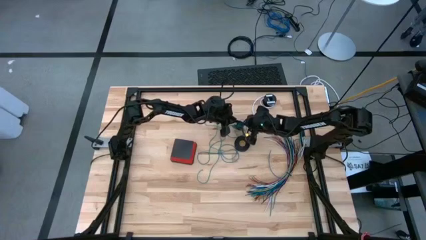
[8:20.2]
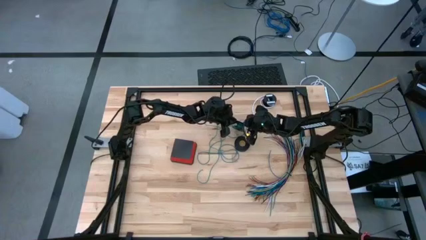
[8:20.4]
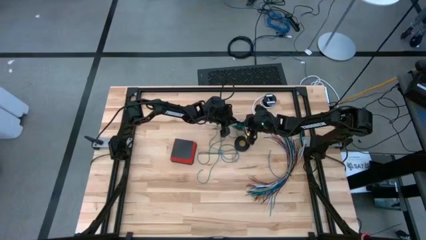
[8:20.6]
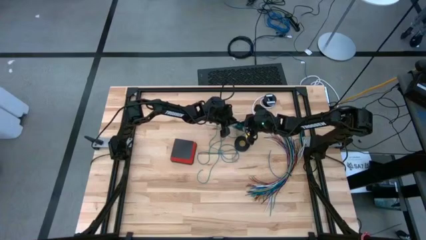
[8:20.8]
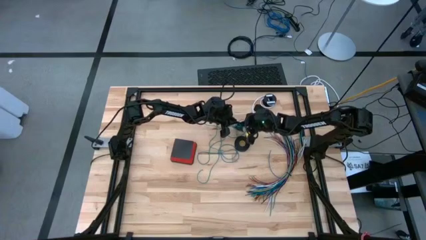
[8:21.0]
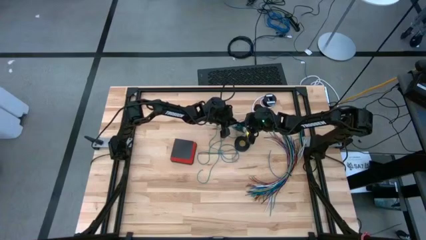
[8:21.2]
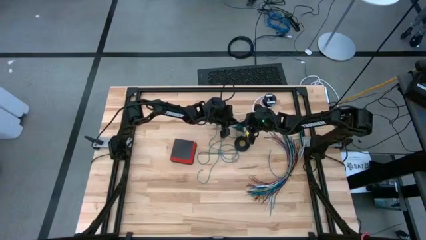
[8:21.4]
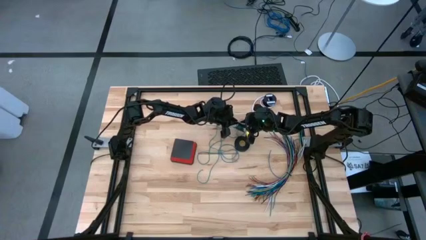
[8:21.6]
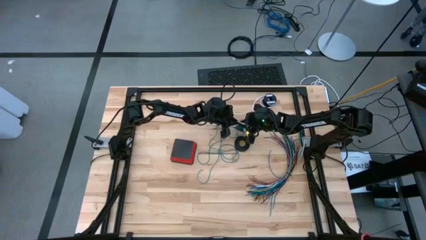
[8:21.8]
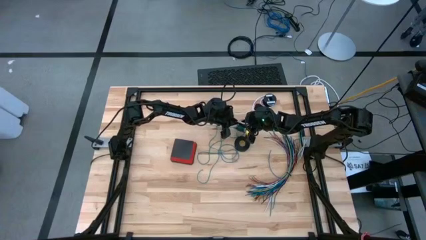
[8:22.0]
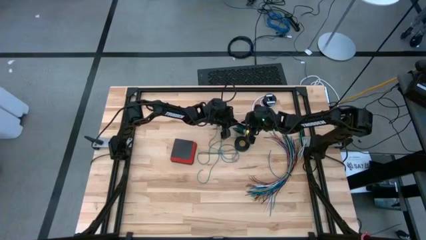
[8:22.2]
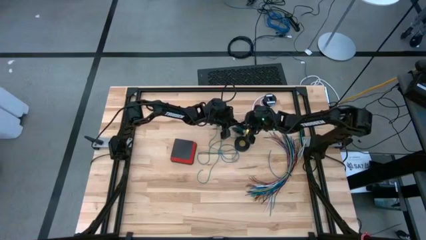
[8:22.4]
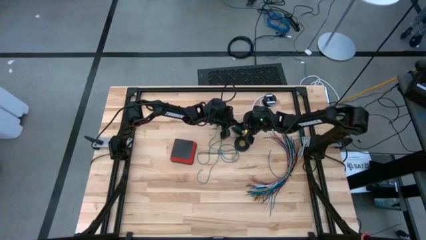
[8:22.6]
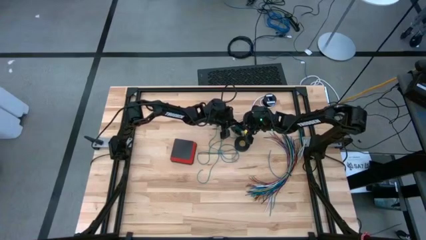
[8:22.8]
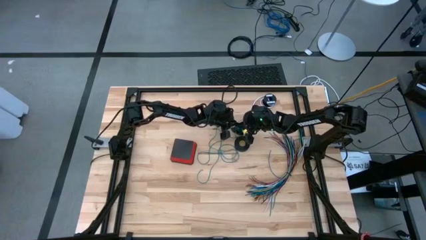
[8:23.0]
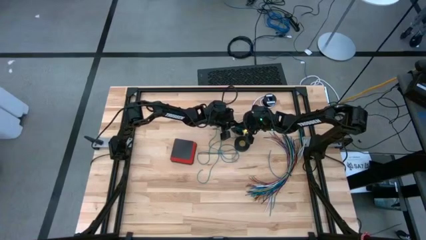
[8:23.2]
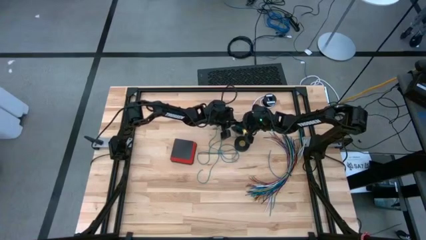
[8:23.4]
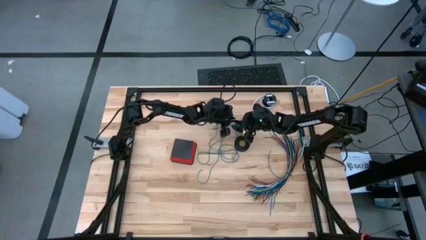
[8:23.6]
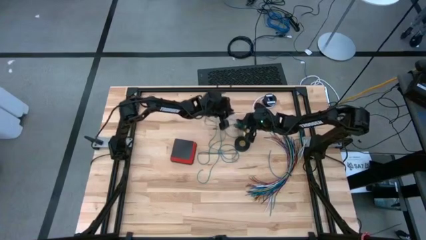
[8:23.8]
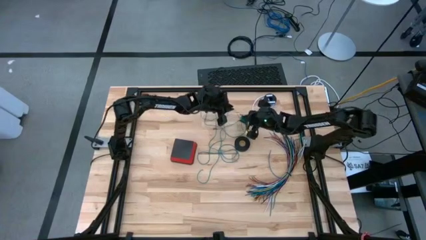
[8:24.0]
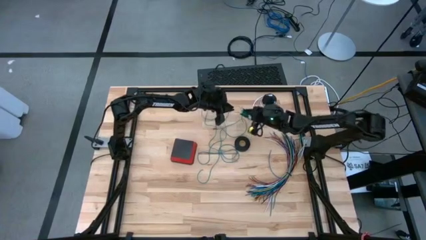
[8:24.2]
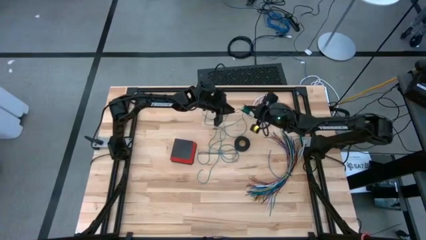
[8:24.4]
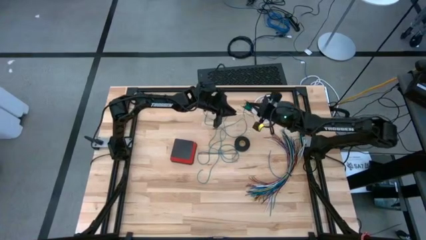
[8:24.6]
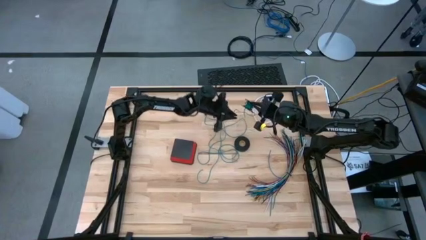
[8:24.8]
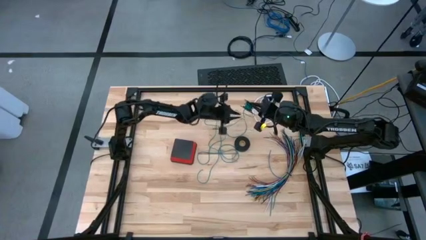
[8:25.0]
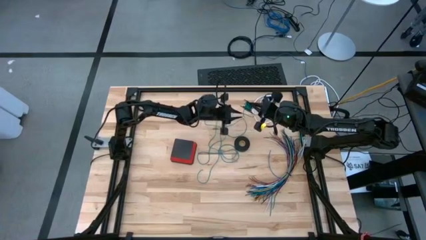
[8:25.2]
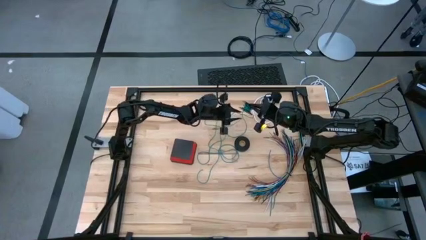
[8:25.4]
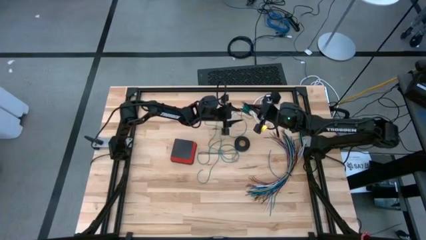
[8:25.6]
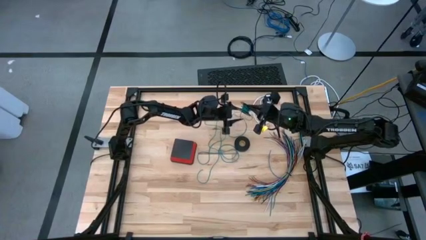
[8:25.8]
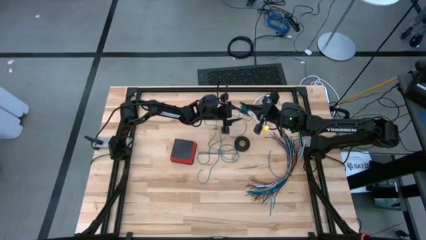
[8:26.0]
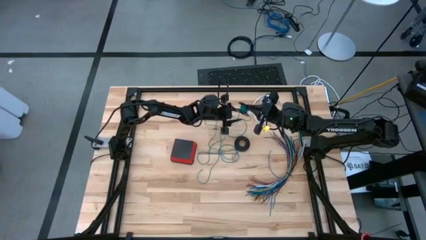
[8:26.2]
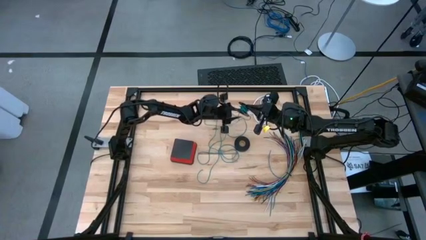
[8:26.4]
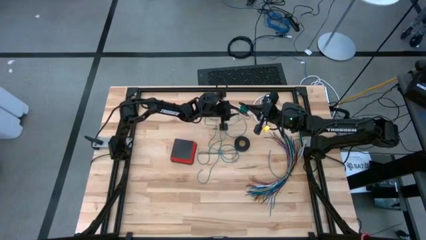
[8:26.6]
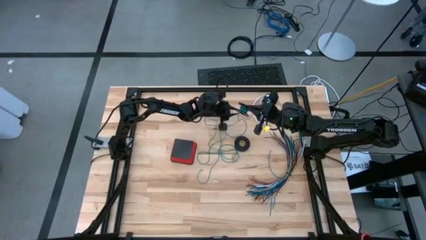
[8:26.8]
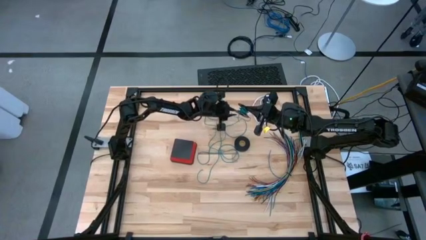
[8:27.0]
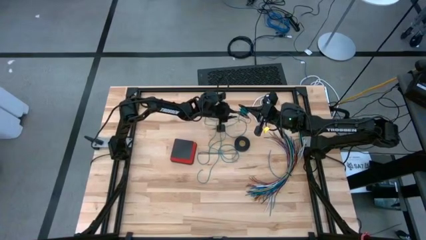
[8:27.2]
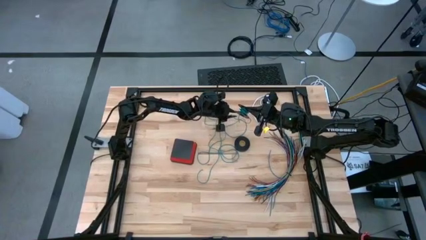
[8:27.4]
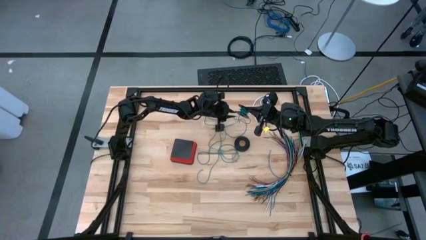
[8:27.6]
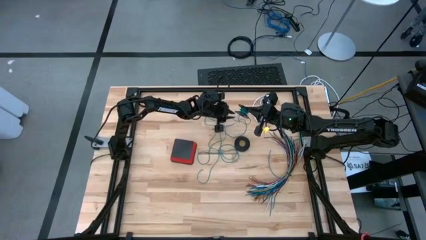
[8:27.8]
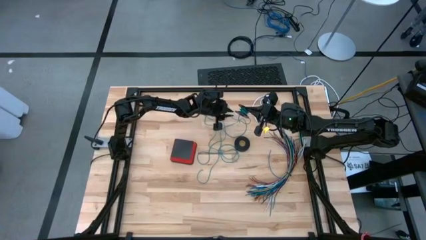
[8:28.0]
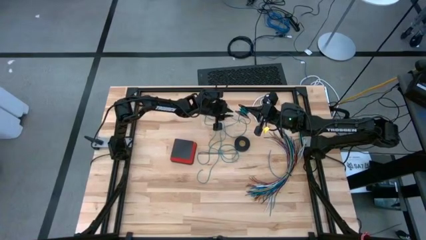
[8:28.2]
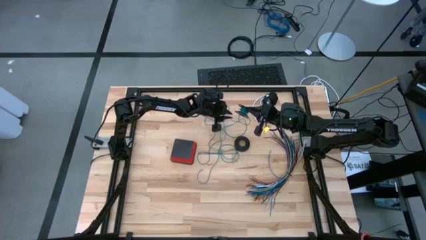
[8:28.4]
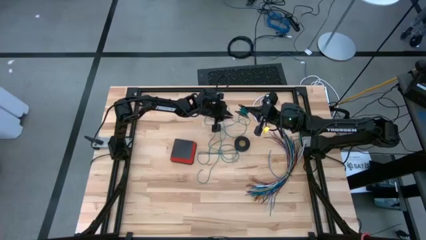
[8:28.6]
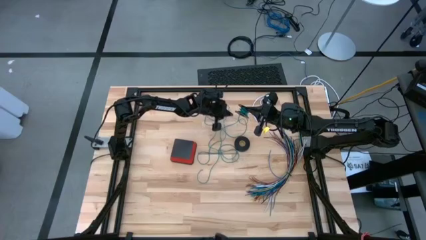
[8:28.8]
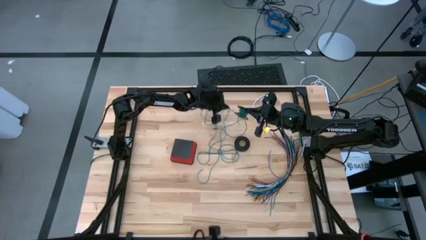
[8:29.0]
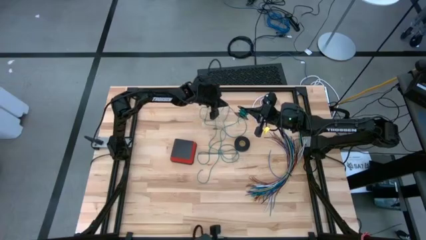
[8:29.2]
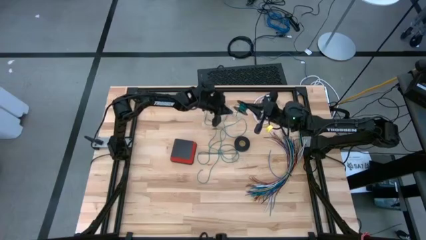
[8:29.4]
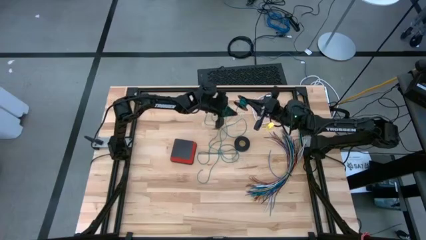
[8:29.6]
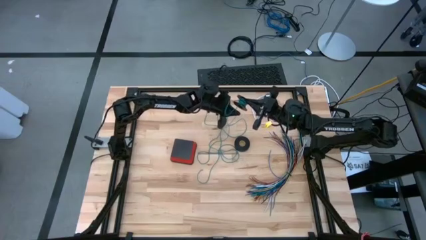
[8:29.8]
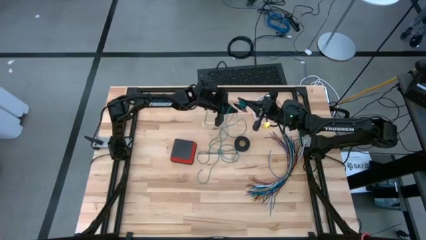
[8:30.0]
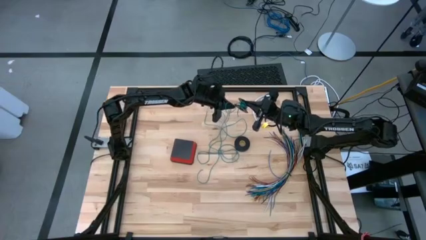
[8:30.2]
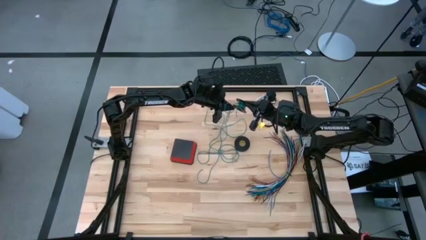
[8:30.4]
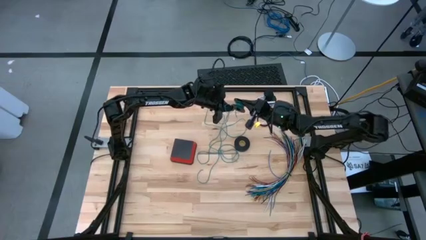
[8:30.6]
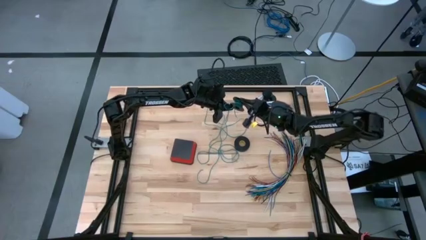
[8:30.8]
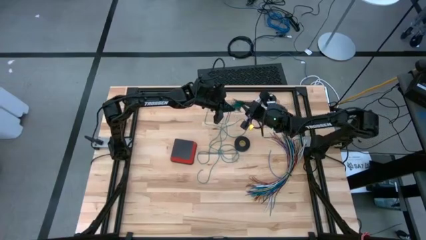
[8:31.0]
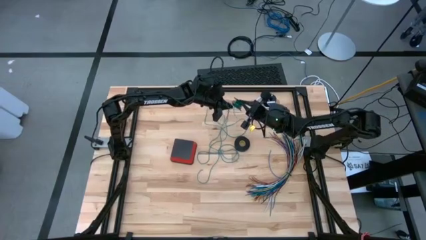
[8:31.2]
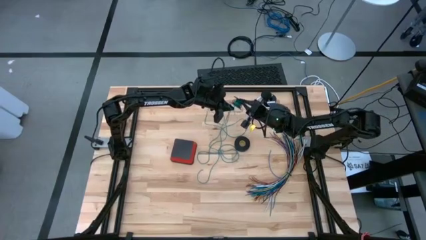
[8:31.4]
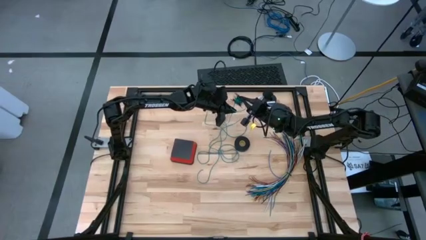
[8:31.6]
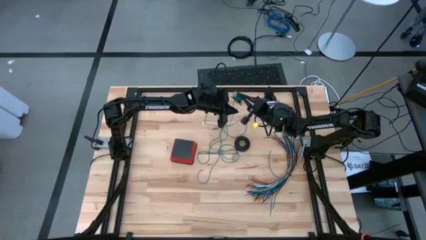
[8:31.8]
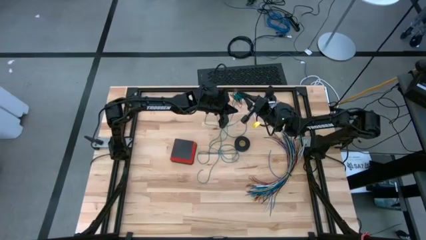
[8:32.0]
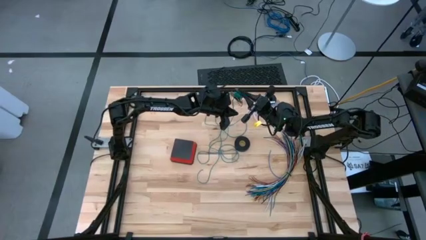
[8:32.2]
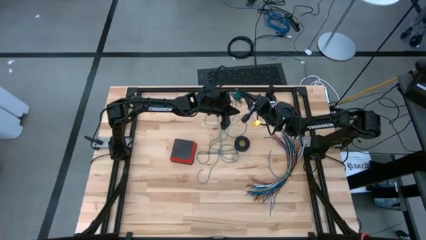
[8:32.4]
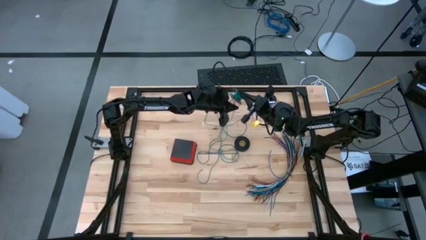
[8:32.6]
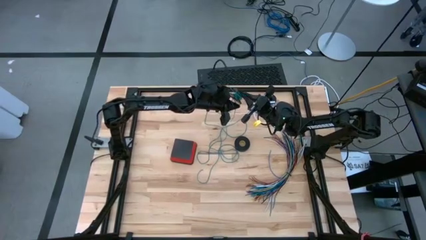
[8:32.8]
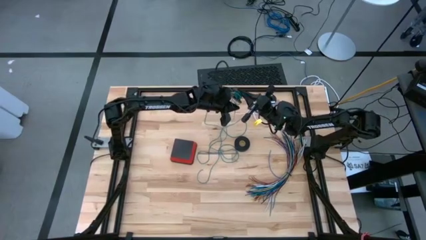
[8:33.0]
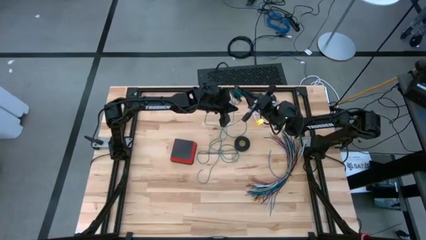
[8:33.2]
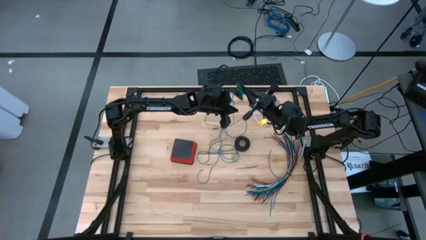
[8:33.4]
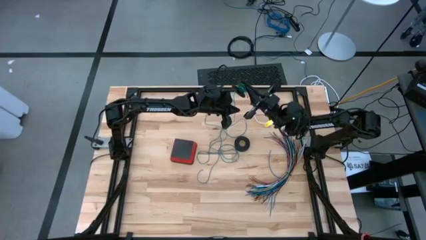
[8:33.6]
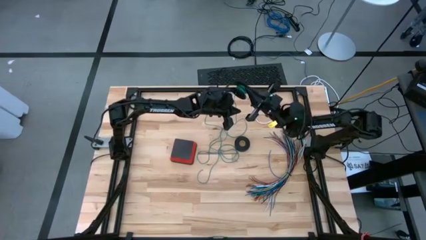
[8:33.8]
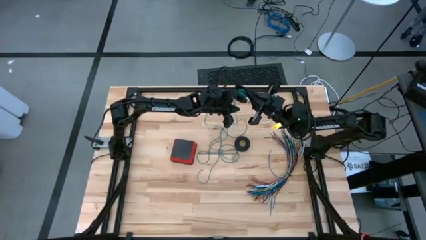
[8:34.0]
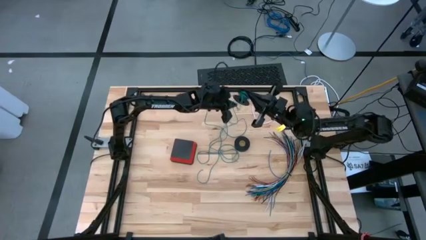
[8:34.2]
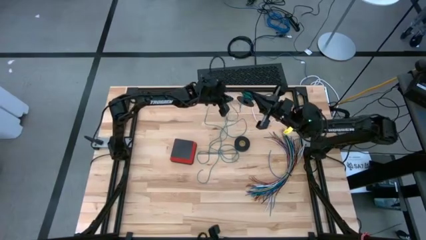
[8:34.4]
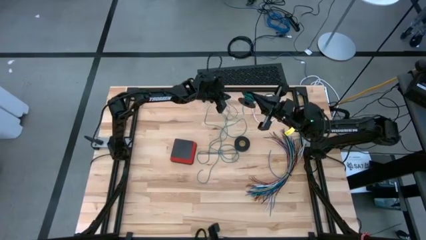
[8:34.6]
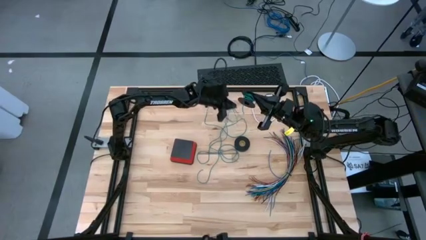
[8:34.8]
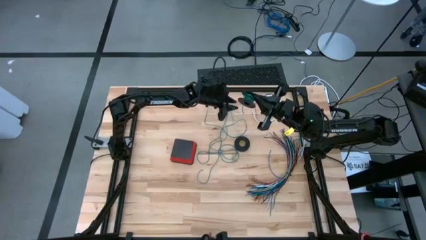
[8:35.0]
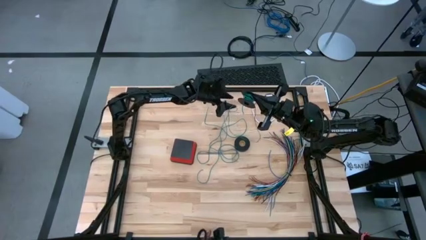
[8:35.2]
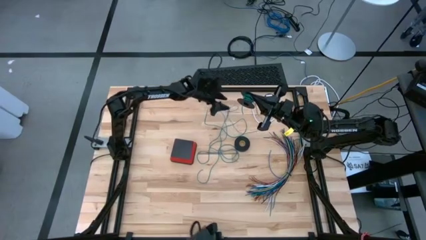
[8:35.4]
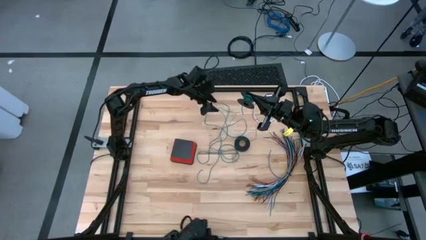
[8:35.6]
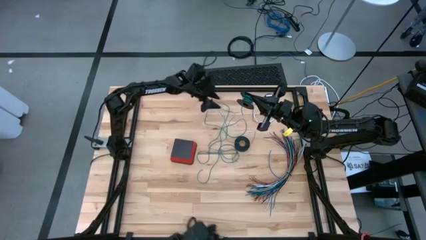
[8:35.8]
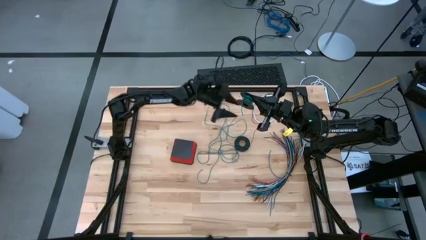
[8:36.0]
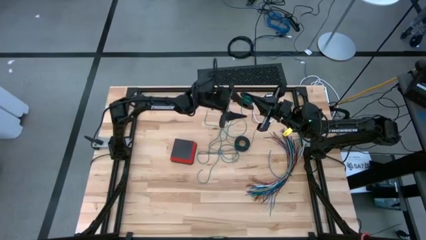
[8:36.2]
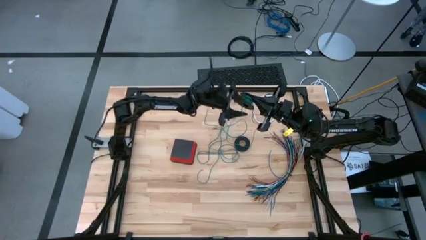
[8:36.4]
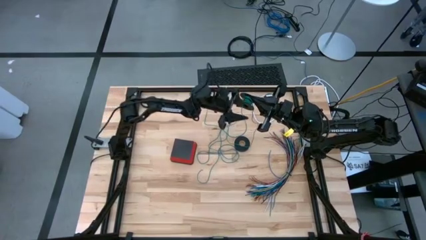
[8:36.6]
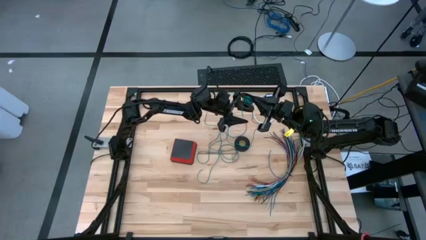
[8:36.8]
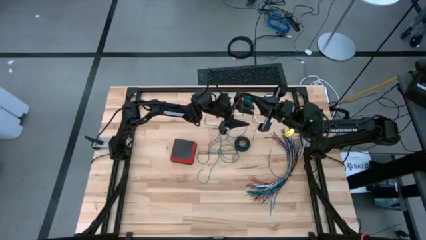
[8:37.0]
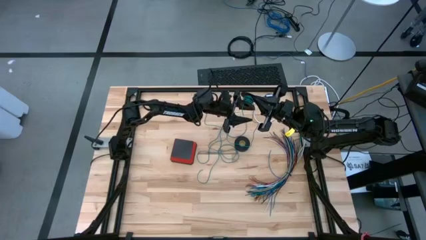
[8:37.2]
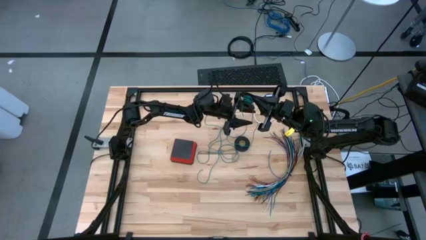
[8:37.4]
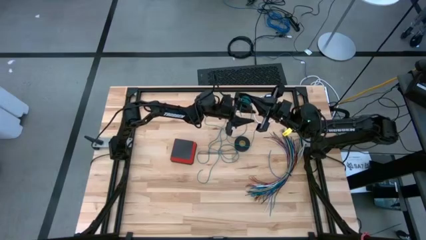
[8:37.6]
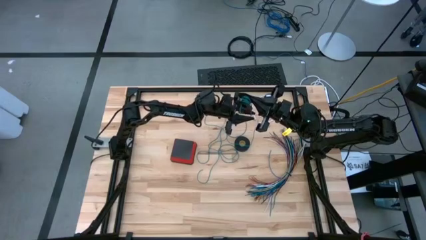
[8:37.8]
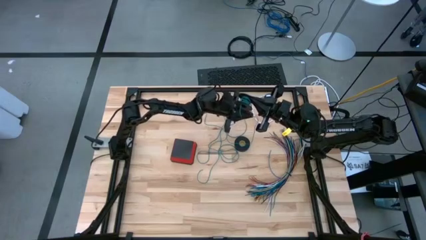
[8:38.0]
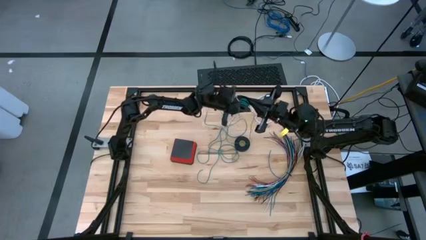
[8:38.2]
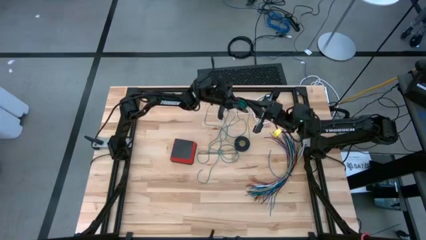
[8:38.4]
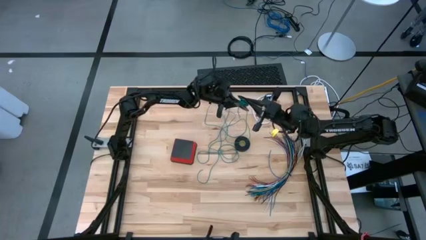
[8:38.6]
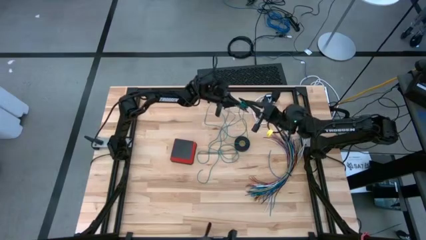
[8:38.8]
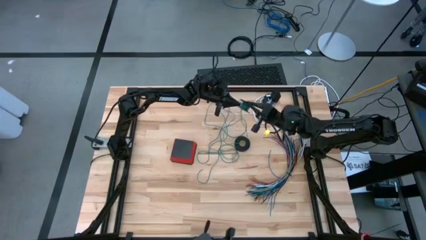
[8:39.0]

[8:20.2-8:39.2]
Task: Coiling cords
Coil the green wire cable on the spool
